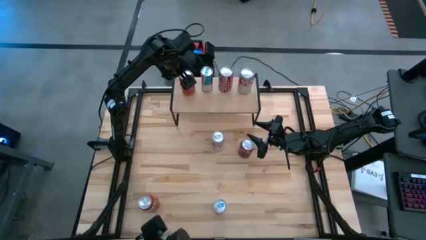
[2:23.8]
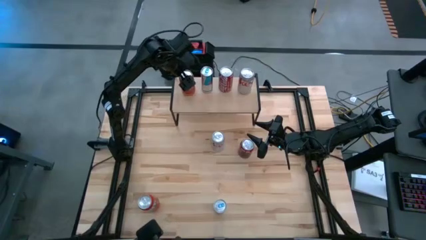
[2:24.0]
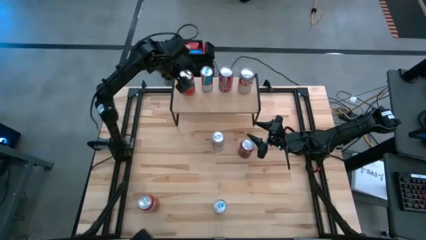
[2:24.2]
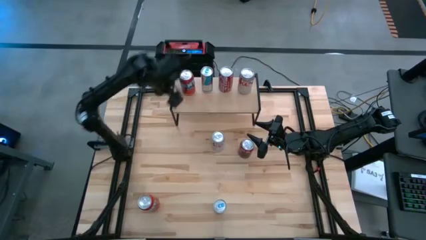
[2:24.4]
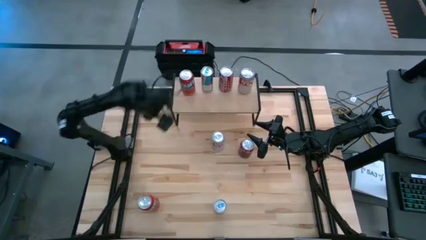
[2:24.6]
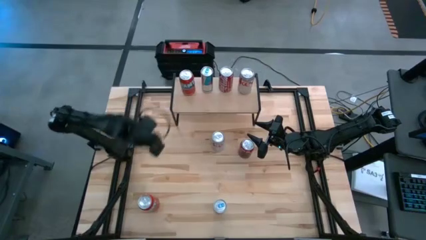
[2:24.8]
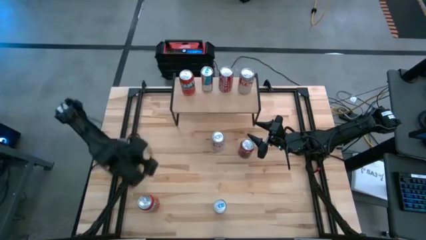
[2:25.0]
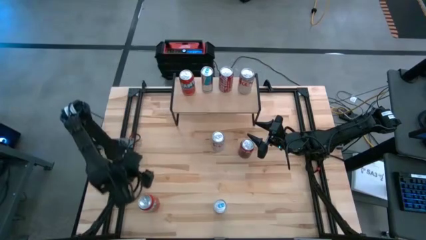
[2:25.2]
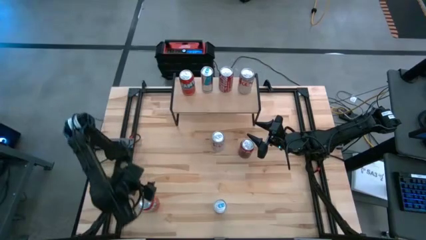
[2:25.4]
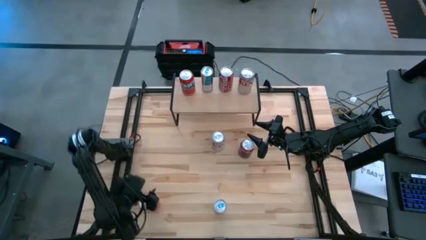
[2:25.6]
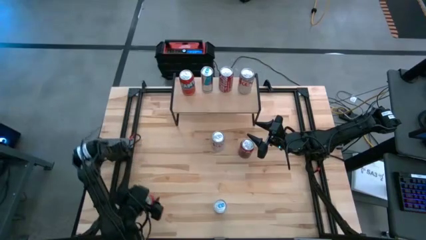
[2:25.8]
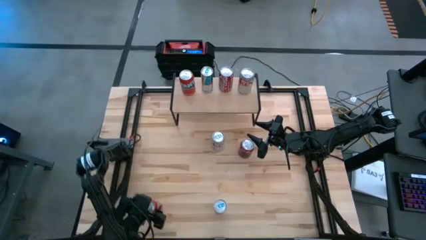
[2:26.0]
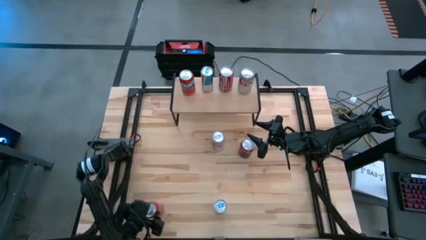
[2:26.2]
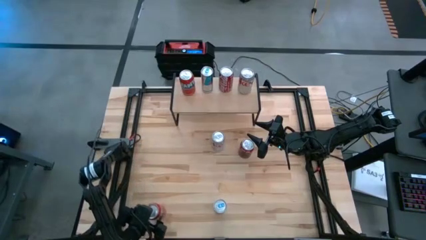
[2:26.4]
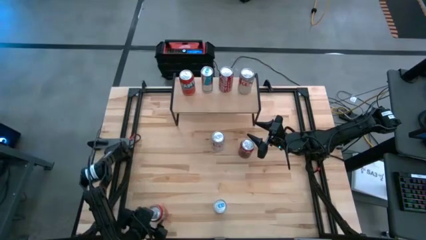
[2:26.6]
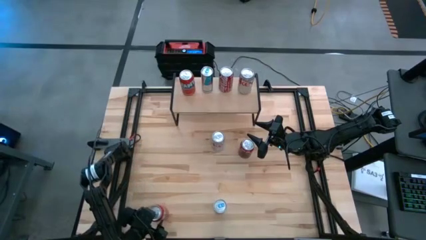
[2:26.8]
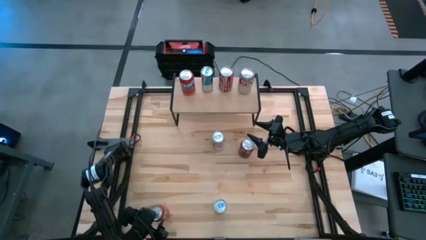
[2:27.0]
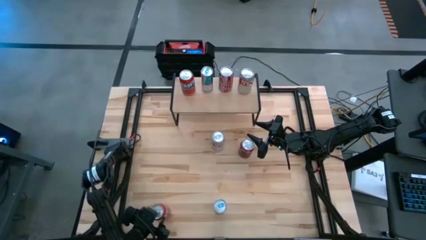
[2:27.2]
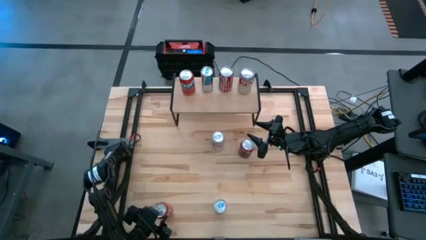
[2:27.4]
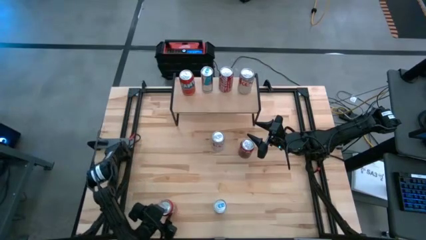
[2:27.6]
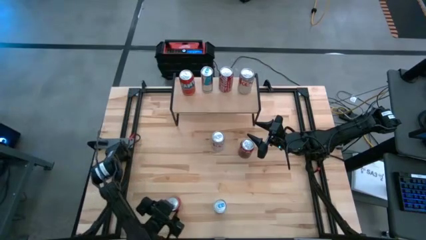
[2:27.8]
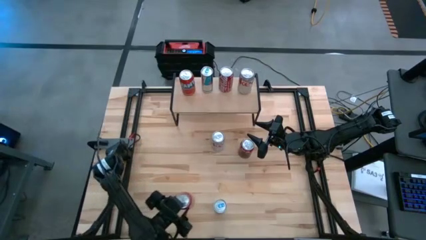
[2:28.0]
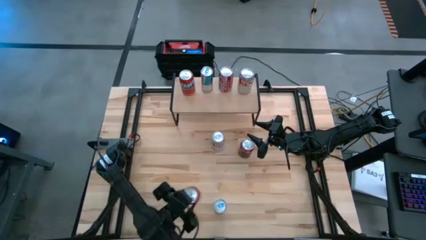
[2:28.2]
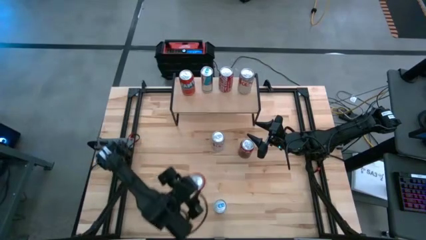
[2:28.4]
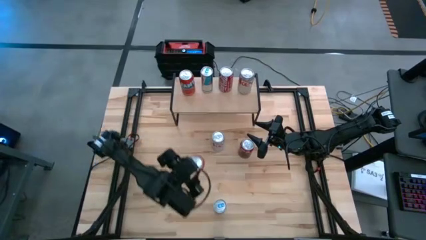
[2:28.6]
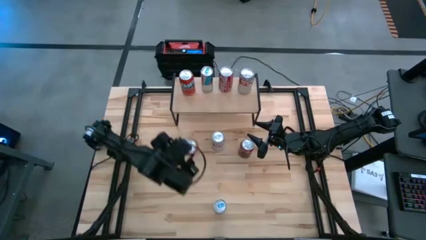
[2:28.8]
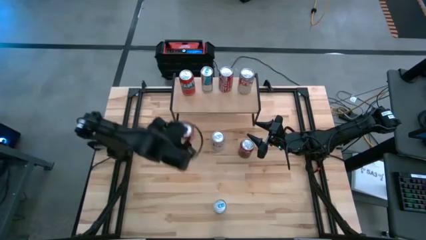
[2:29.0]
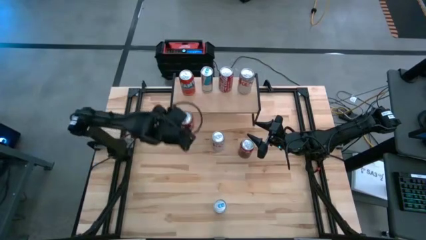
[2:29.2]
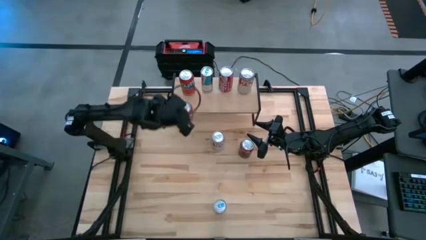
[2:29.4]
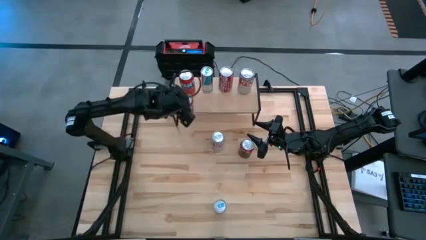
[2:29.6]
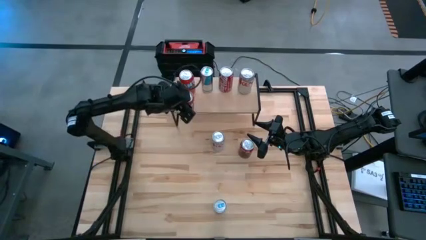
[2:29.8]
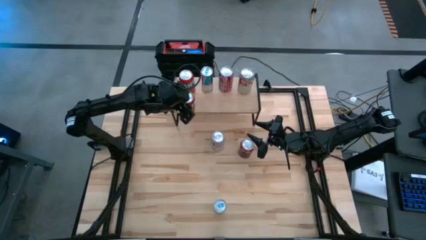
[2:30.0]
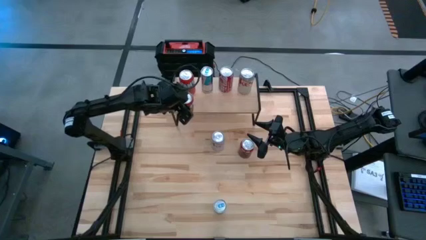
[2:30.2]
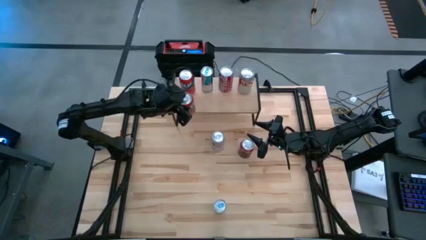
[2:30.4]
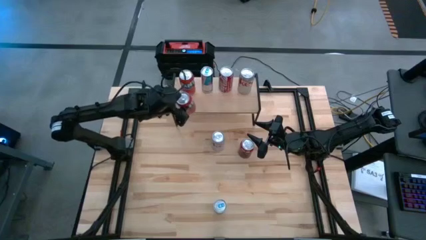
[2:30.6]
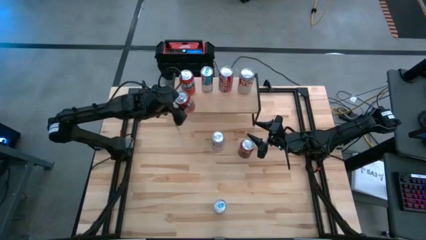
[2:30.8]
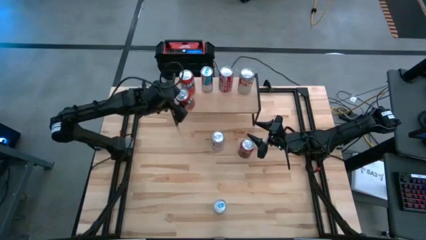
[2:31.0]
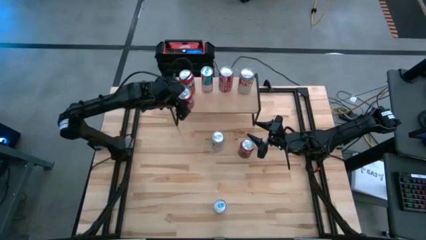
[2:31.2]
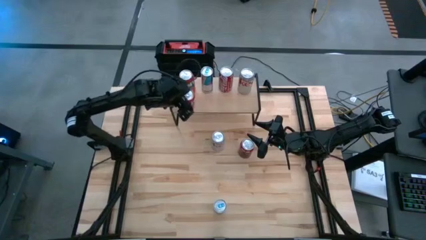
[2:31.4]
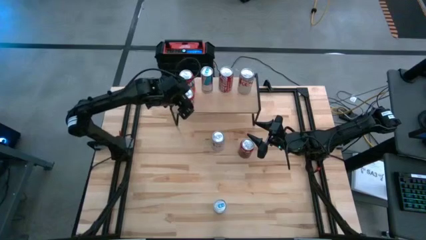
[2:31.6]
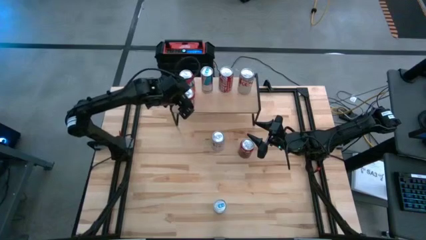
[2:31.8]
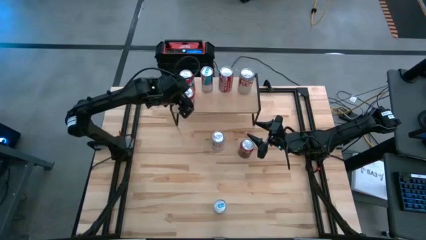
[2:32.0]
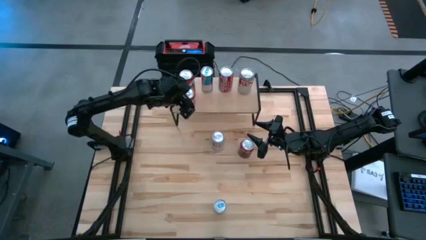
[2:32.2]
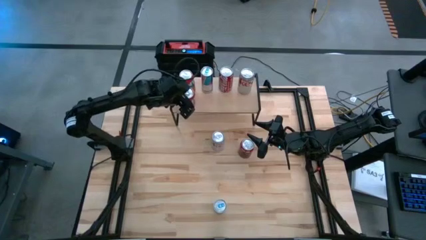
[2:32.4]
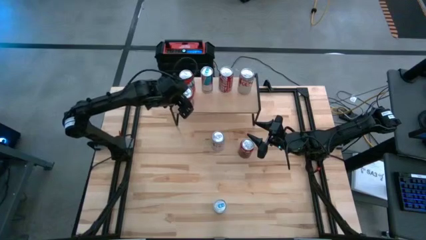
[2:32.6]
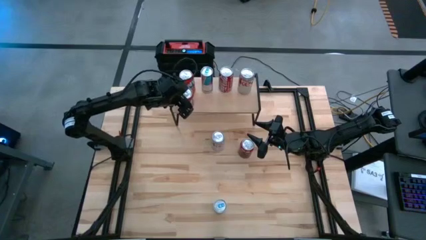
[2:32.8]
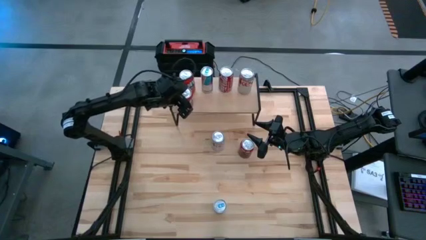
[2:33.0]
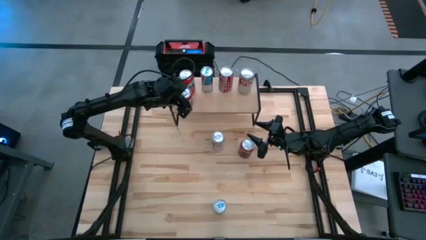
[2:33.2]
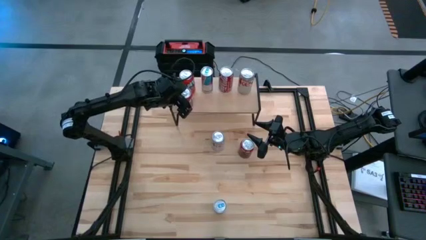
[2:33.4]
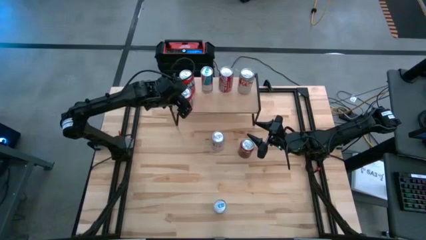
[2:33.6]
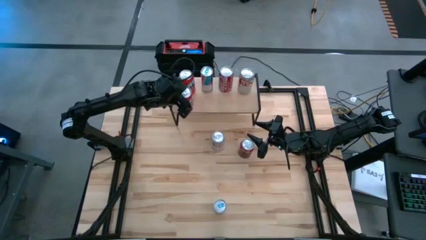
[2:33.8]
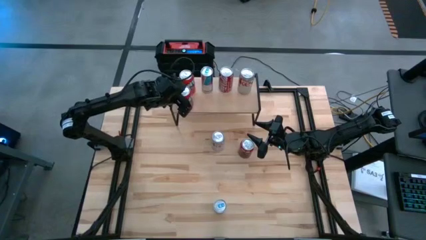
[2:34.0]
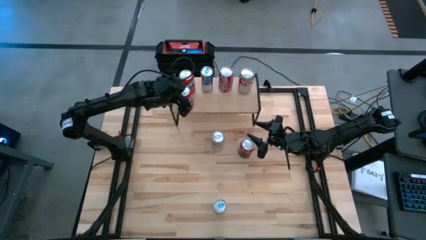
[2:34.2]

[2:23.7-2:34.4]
Task: Place canned beverage on shelf
Put the red soda can on the shelf aligned with the other red soda can
